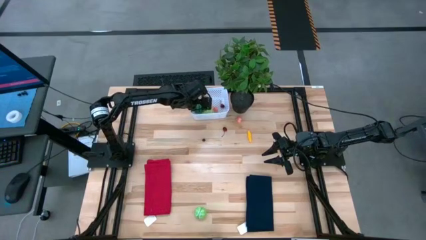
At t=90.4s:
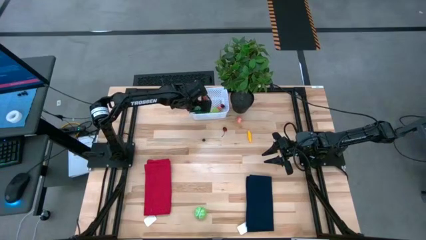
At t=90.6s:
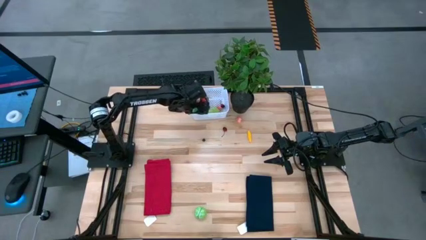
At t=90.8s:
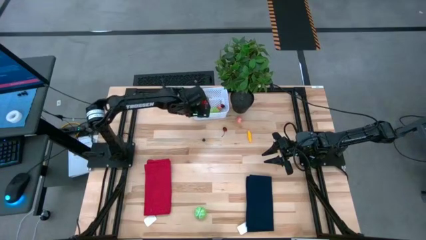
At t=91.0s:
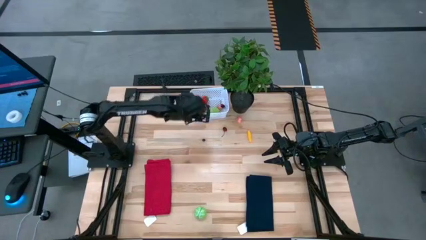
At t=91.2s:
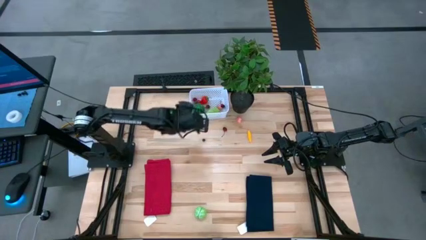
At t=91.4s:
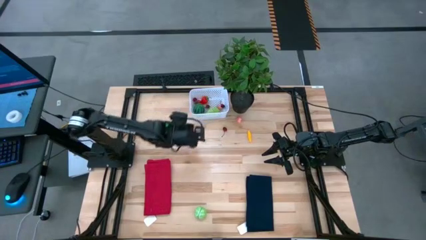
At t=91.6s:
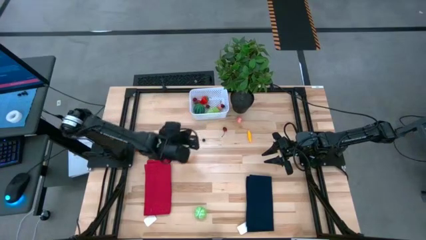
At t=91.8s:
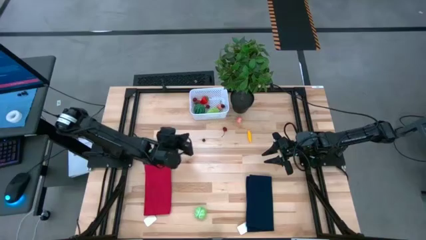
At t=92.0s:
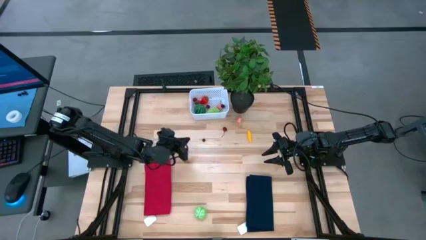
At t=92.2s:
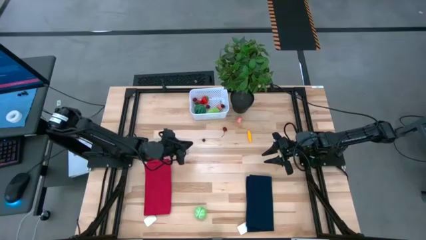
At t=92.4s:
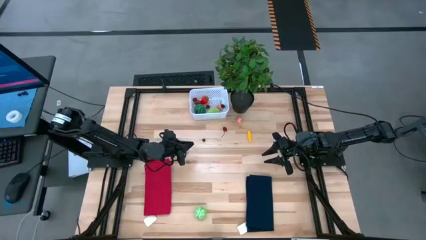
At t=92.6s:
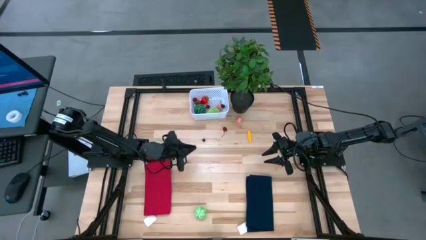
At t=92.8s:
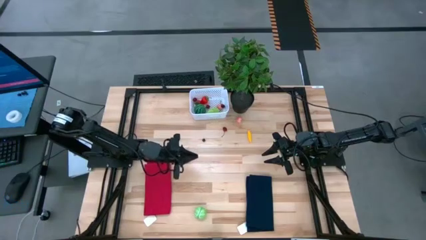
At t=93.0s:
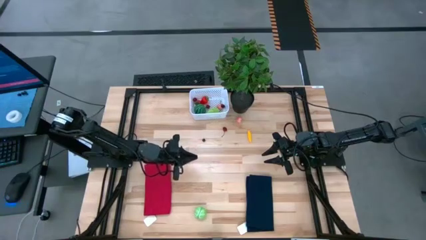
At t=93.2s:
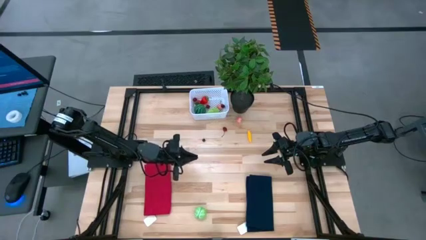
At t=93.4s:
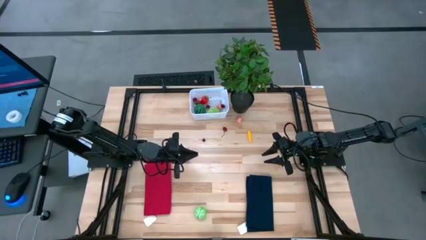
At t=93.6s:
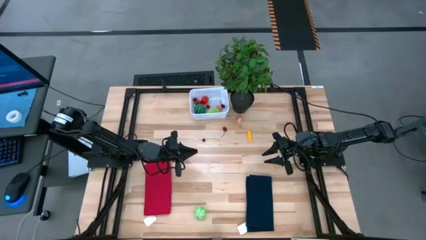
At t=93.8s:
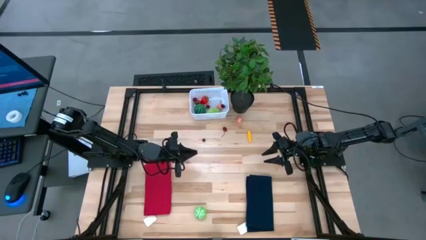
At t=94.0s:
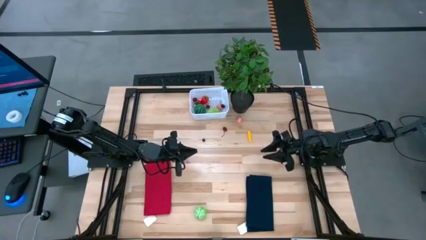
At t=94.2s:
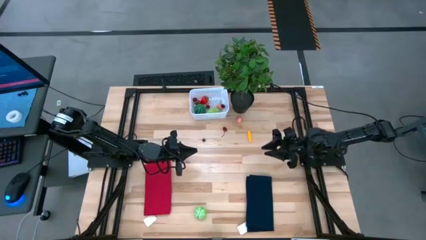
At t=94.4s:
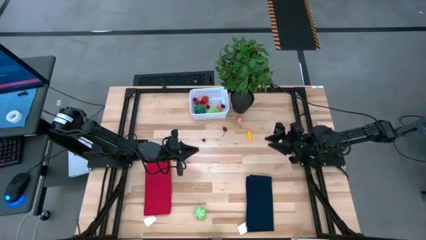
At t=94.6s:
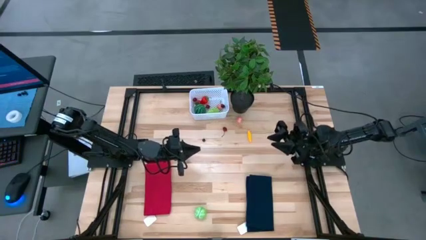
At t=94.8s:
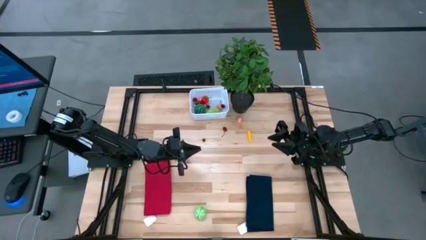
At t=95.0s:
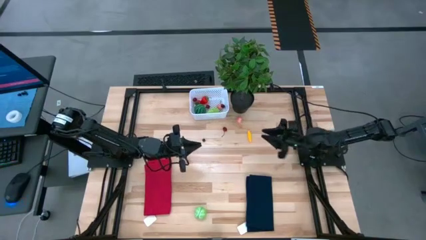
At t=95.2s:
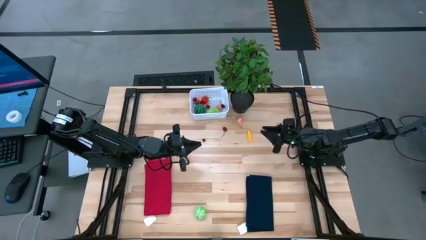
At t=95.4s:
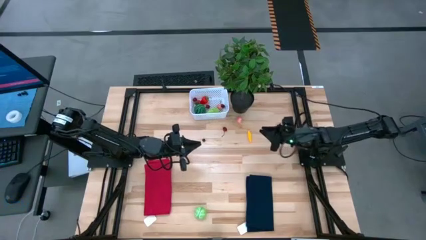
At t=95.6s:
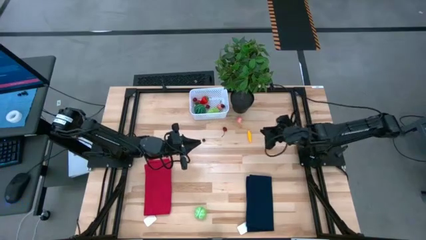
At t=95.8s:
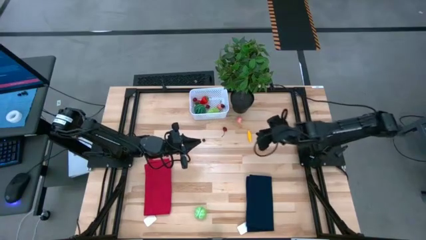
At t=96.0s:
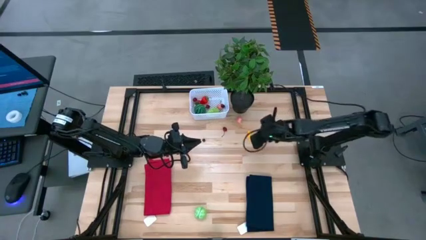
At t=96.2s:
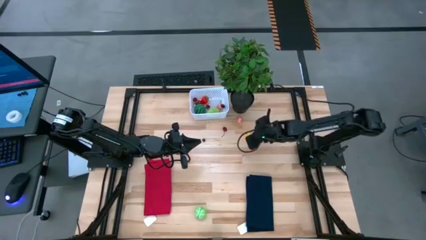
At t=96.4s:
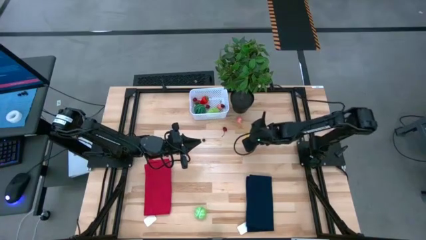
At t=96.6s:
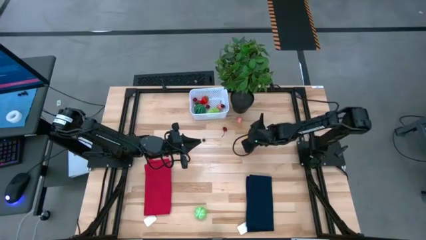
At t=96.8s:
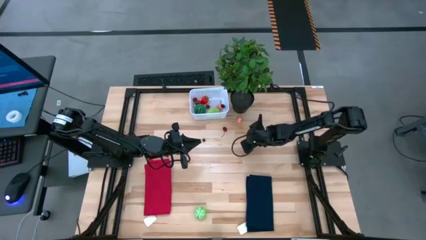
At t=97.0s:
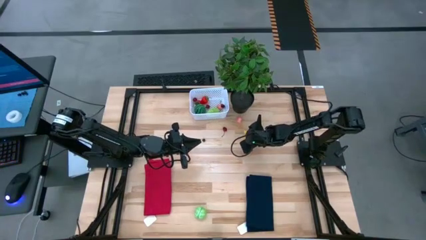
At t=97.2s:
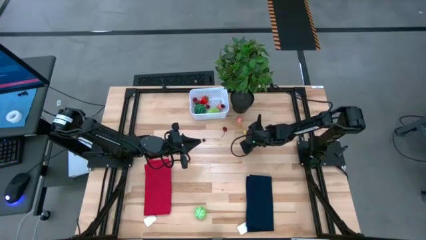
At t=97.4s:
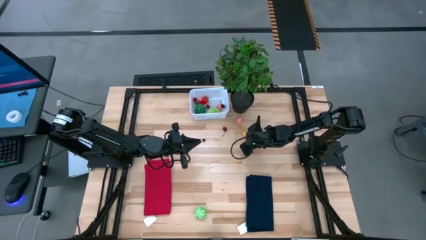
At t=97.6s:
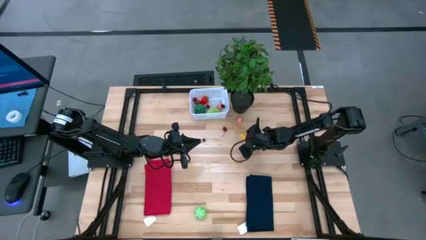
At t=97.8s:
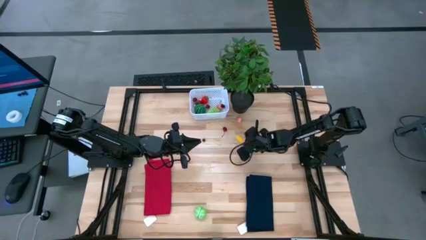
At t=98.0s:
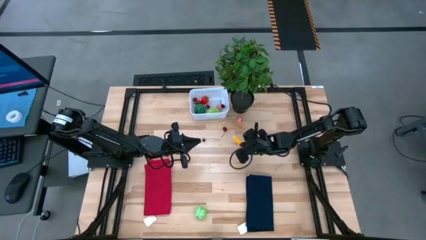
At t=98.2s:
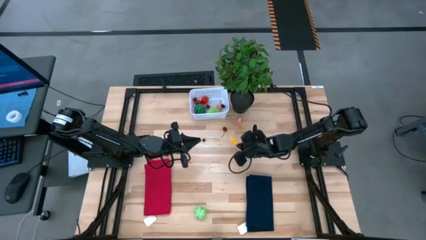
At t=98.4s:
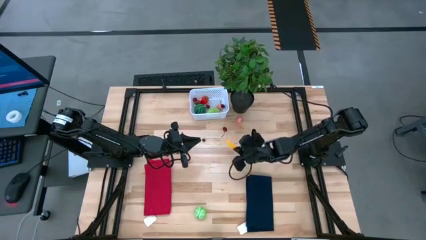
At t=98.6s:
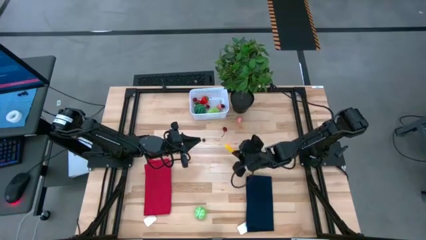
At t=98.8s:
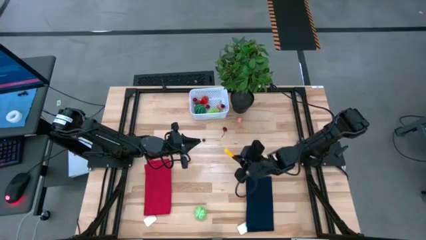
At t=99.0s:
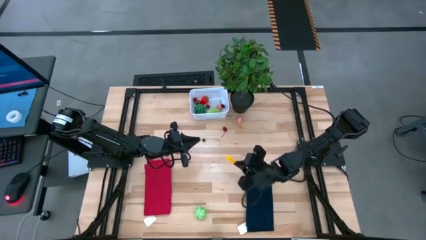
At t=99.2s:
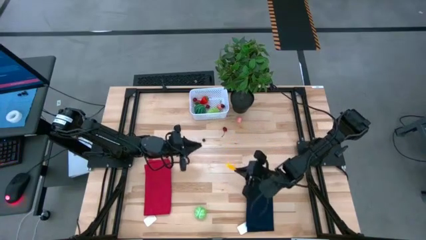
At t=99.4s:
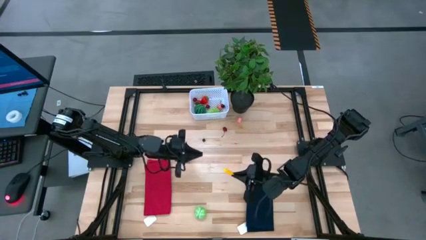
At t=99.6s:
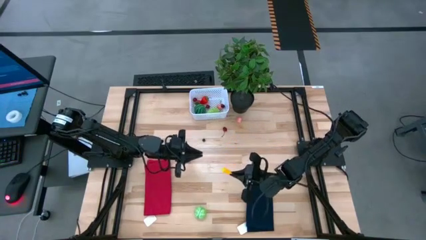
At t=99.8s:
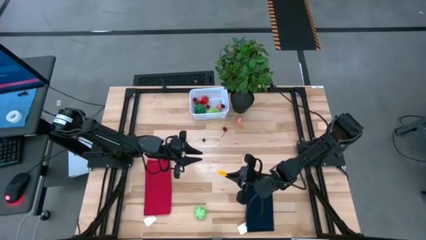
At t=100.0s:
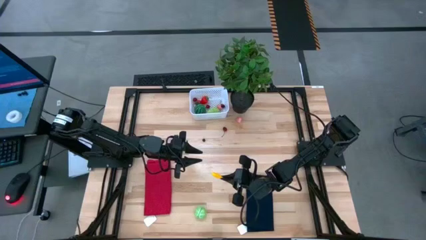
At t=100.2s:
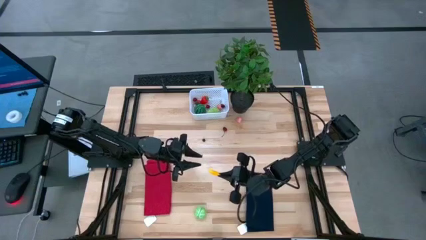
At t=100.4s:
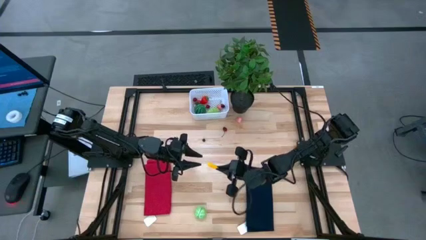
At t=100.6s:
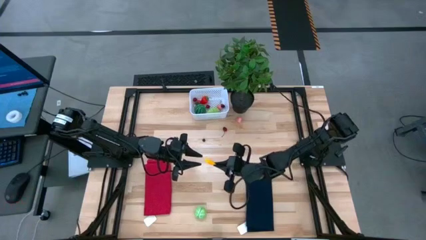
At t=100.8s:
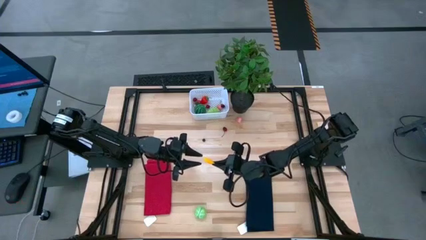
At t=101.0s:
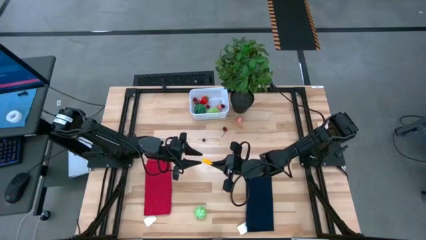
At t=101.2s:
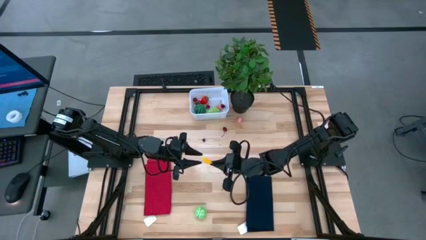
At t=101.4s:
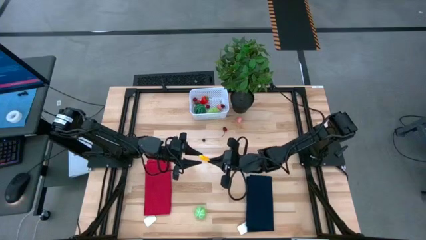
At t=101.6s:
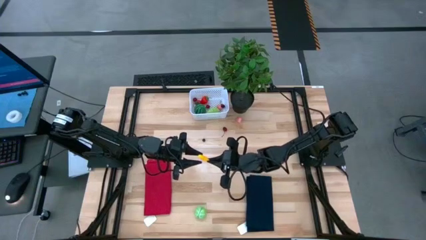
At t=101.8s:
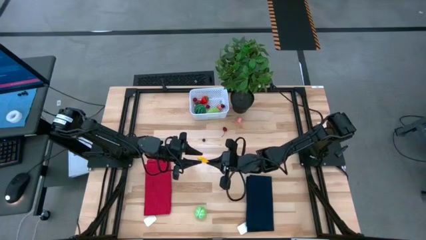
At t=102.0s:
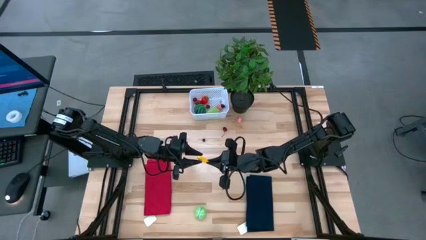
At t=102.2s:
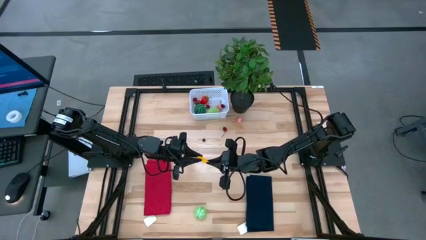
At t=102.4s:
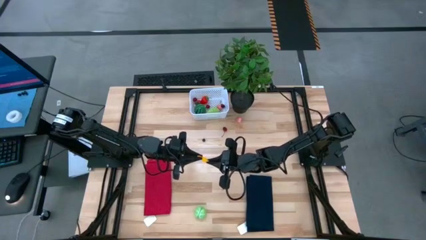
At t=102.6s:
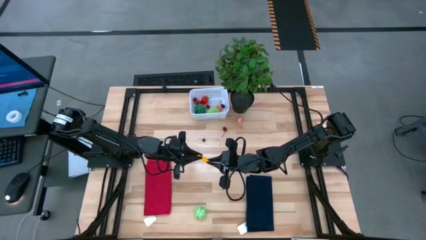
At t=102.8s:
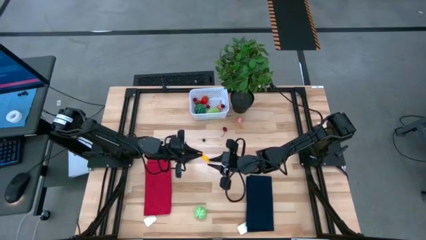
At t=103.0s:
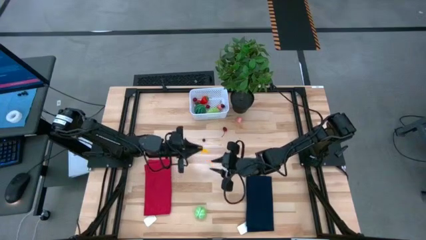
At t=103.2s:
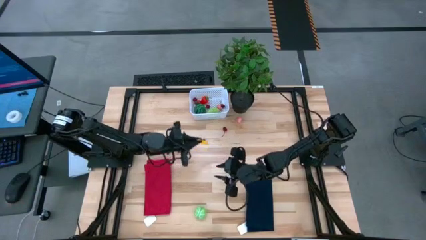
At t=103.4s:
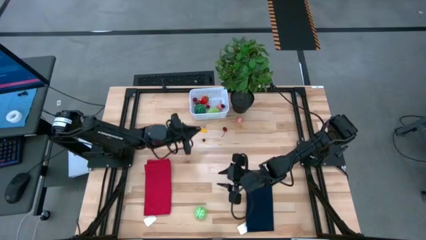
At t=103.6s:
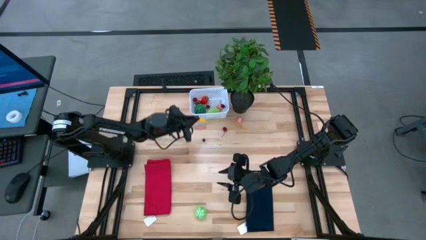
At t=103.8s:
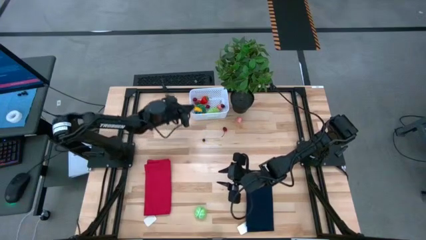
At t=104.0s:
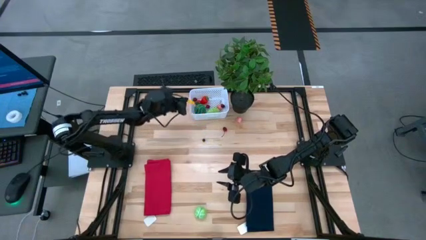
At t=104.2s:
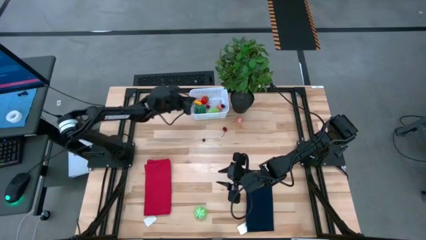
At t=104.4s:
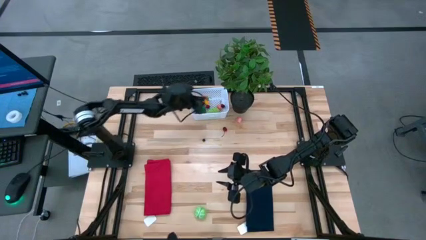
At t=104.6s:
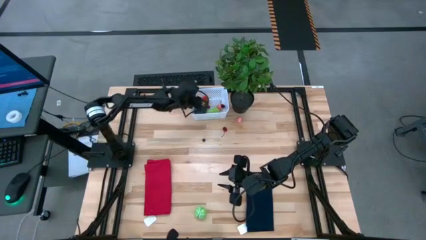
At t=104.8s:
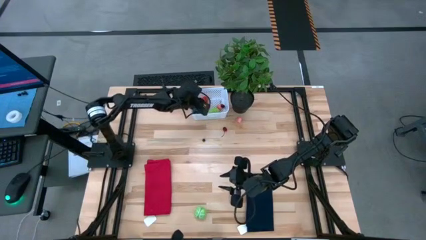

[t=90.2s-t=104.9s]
Task: Pick and placing Produce into tupperware
Put the yellow corn into the white basket

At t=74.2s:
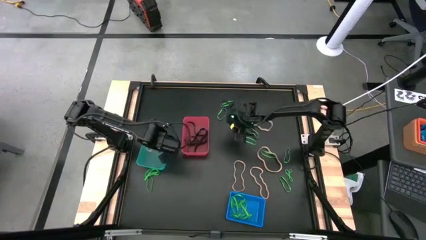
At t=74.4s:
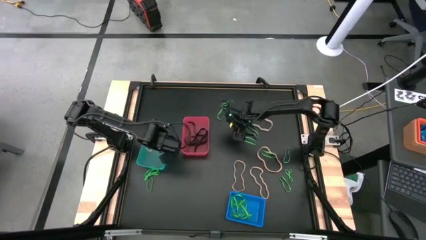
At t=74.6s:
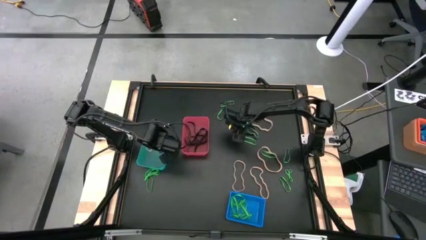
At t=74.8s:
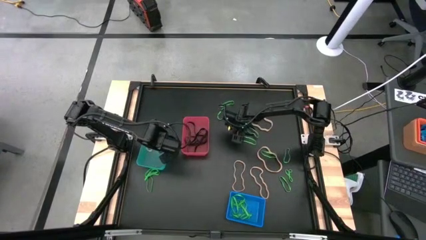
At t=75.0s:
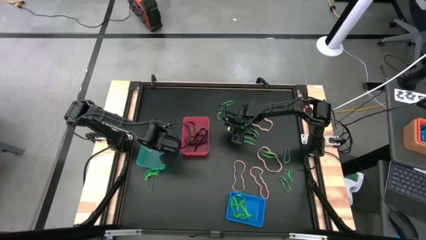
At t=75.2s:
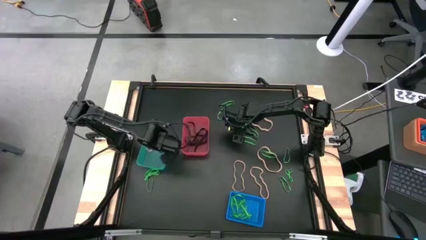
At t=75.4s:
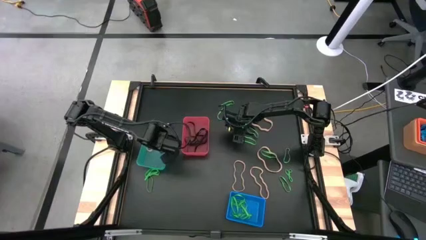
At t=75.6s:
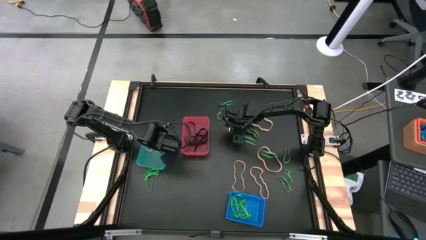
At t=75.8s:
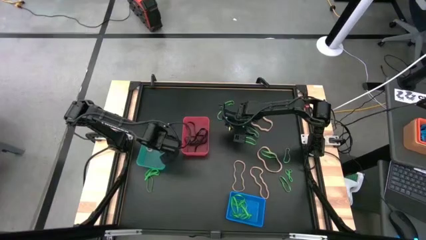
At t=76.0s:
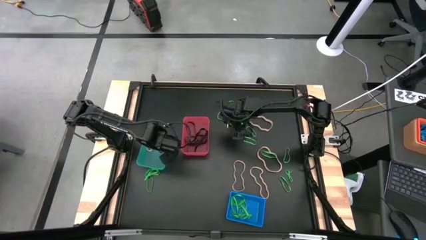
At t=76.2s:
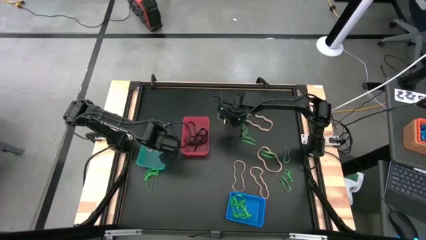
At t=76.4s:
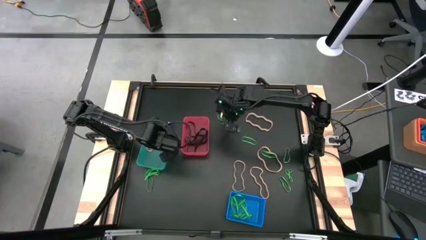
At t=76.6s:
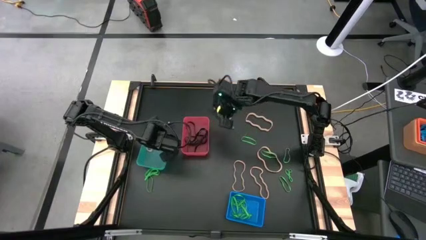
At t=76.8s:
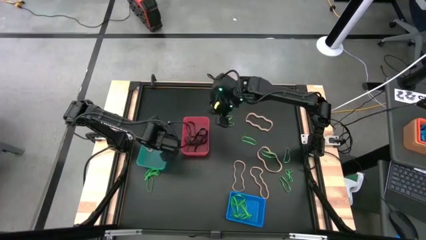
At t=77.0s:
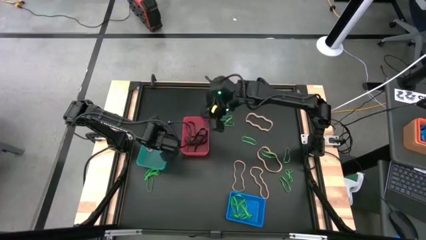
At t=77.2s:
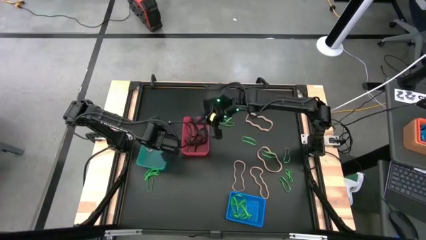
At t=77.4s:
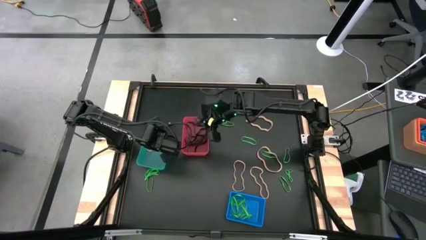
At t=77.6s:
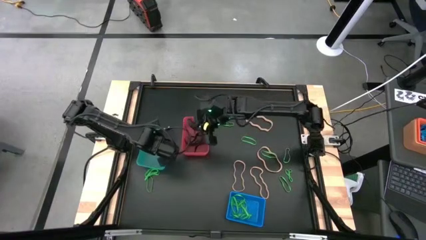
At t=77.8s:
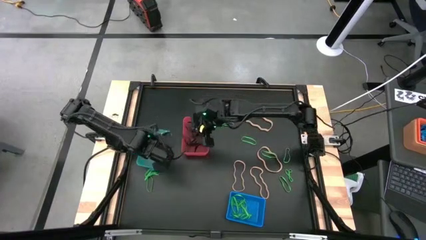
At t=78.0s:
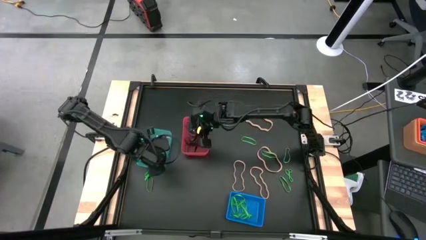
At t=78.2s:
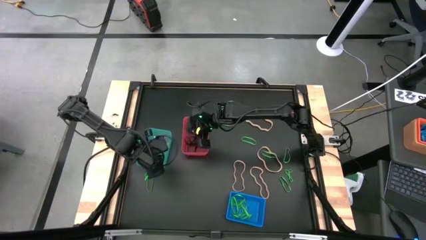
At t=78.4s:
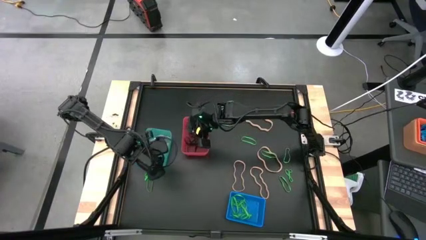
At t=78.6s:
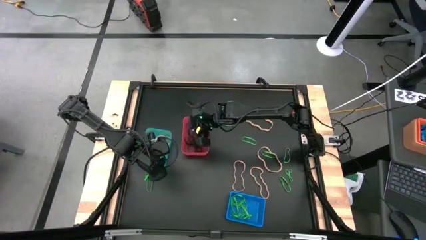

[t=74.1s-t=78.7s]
Task: Sort rubber bands into baskets
Put the black rubber band into the pink bin
